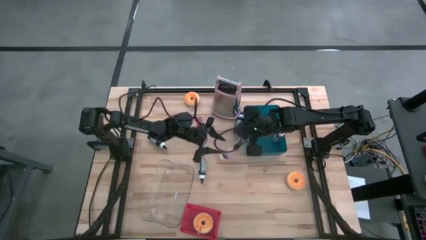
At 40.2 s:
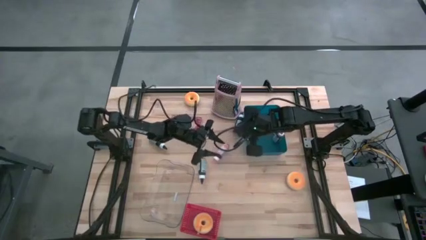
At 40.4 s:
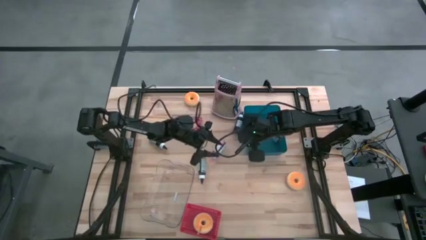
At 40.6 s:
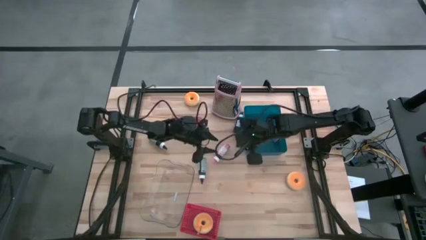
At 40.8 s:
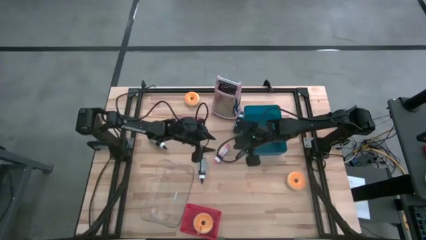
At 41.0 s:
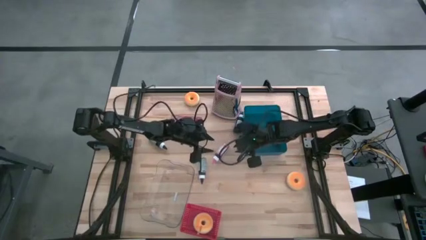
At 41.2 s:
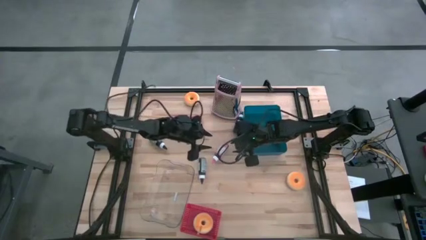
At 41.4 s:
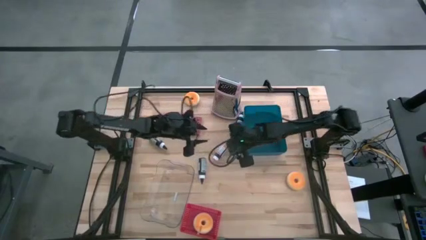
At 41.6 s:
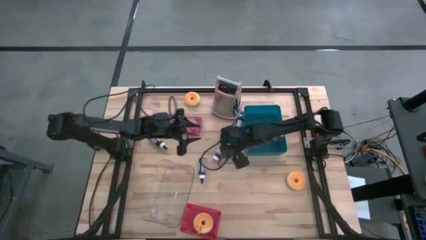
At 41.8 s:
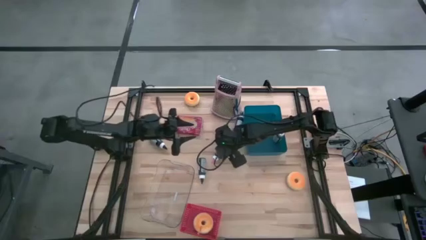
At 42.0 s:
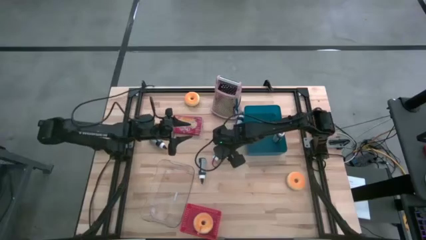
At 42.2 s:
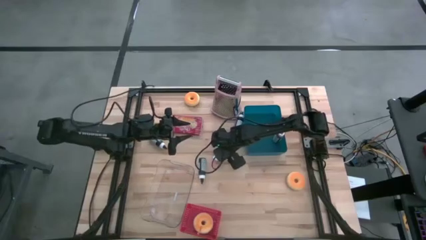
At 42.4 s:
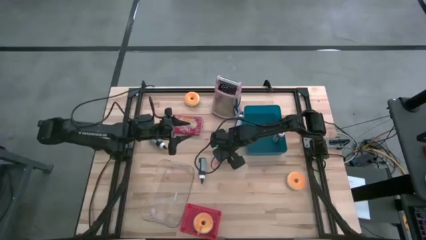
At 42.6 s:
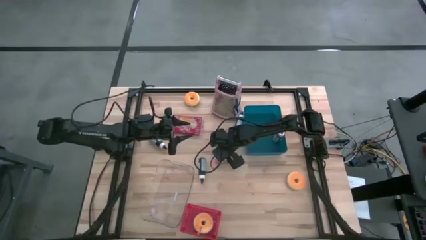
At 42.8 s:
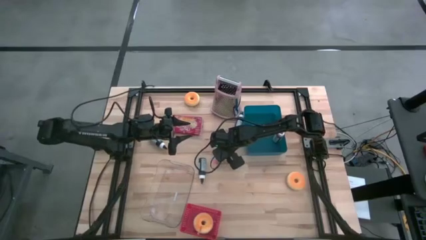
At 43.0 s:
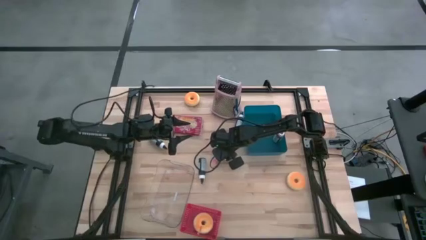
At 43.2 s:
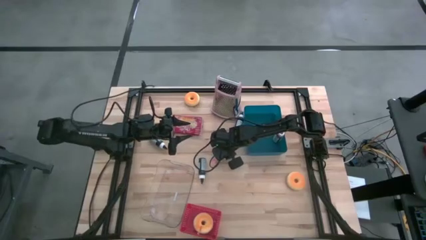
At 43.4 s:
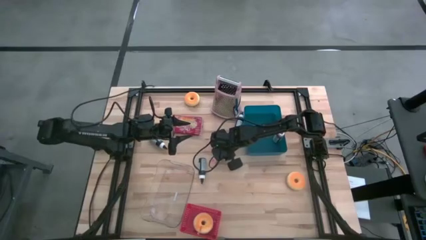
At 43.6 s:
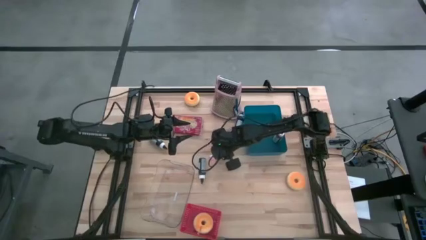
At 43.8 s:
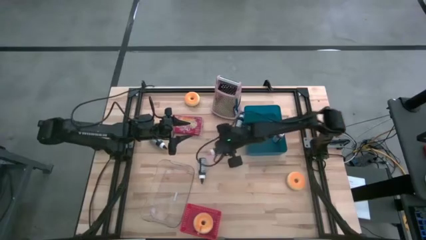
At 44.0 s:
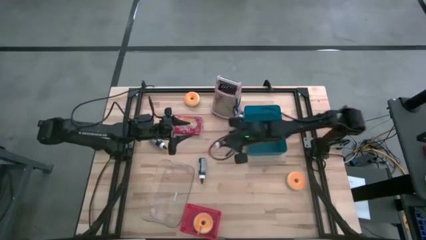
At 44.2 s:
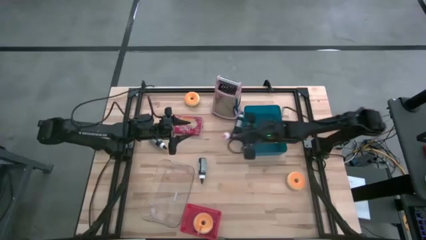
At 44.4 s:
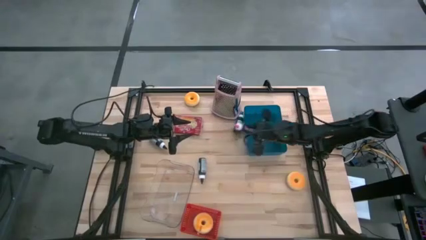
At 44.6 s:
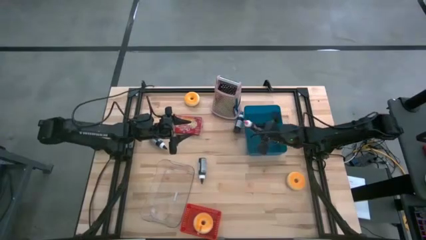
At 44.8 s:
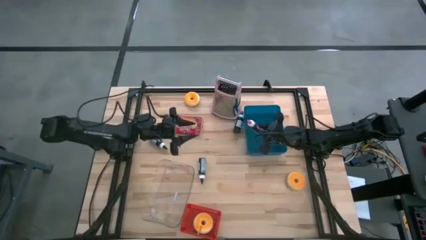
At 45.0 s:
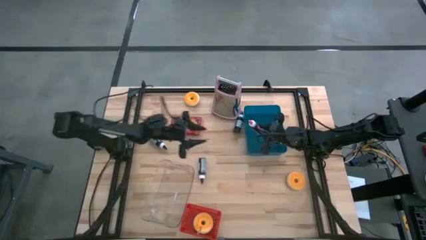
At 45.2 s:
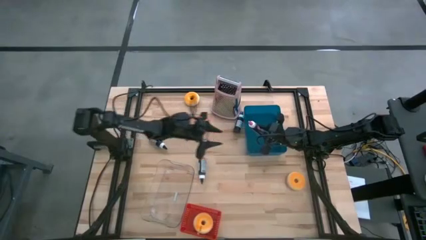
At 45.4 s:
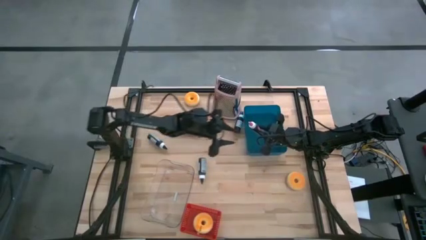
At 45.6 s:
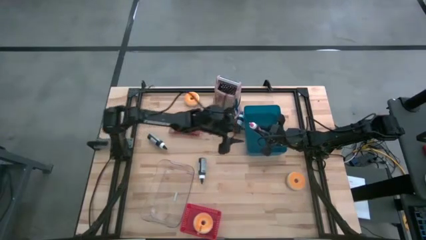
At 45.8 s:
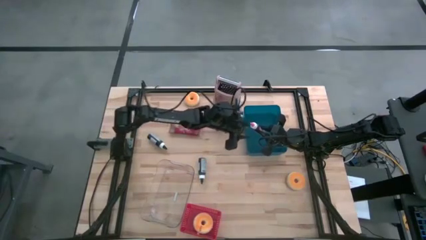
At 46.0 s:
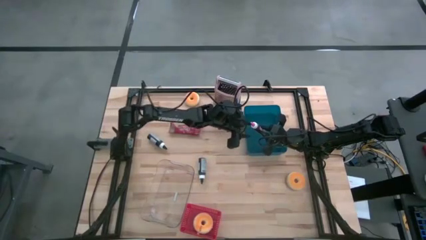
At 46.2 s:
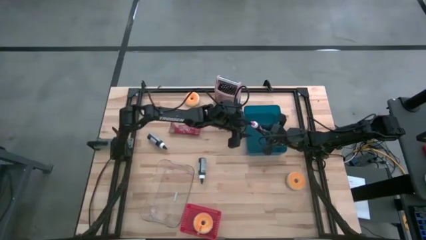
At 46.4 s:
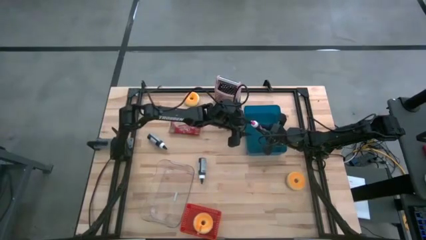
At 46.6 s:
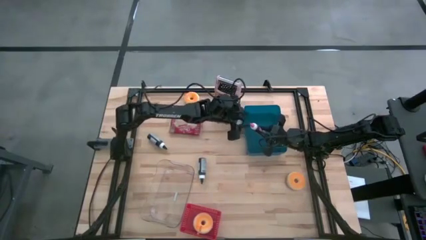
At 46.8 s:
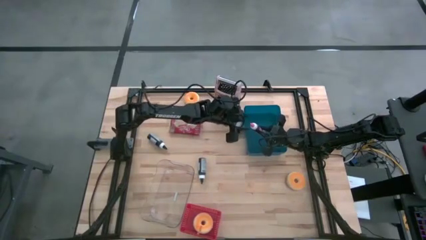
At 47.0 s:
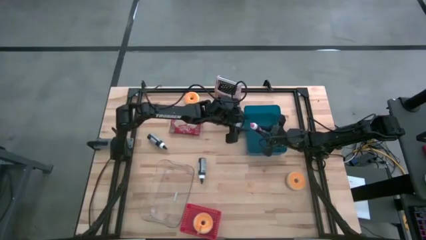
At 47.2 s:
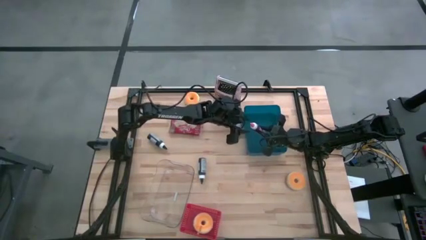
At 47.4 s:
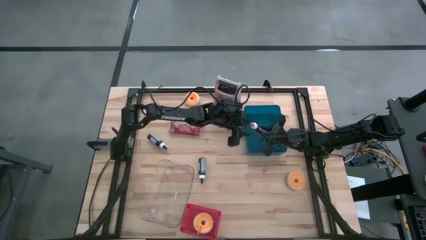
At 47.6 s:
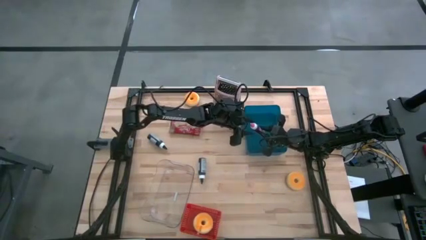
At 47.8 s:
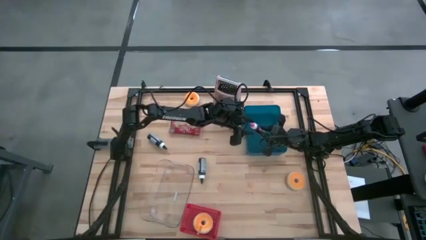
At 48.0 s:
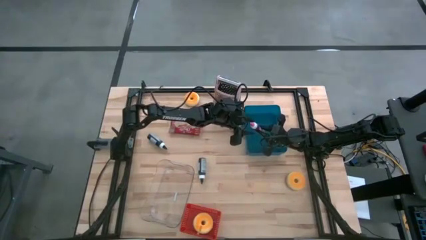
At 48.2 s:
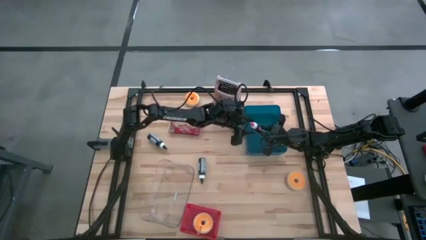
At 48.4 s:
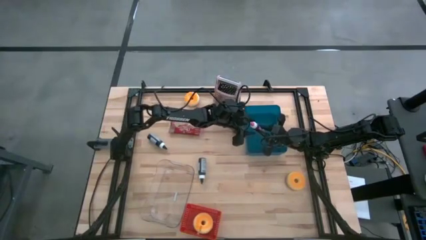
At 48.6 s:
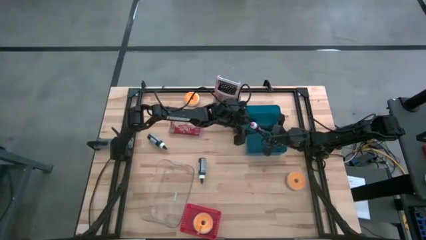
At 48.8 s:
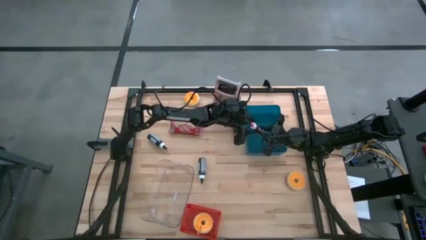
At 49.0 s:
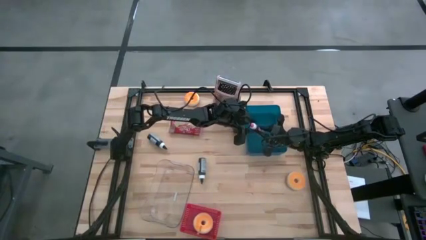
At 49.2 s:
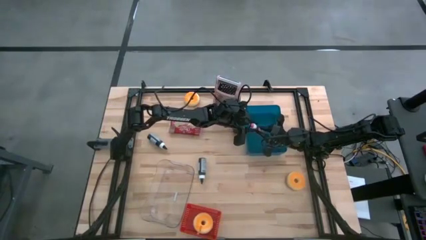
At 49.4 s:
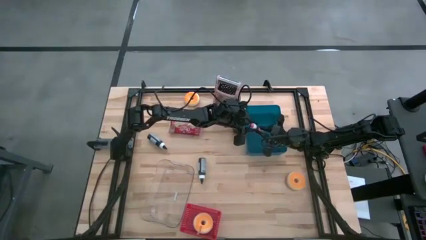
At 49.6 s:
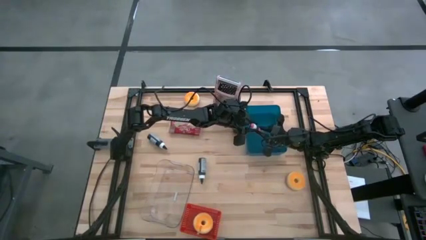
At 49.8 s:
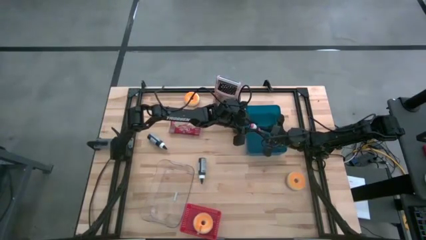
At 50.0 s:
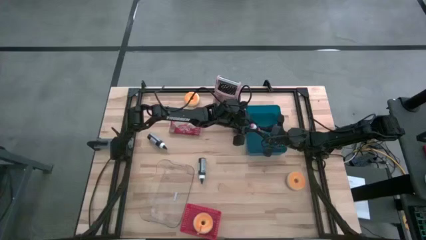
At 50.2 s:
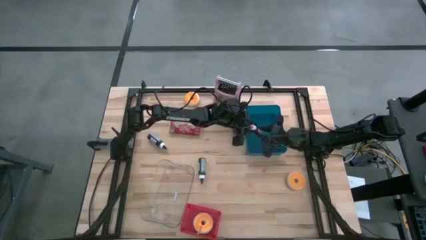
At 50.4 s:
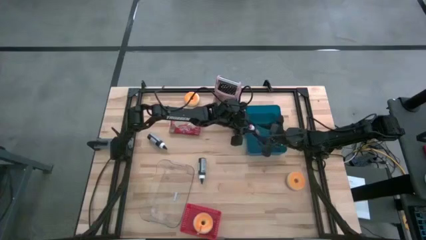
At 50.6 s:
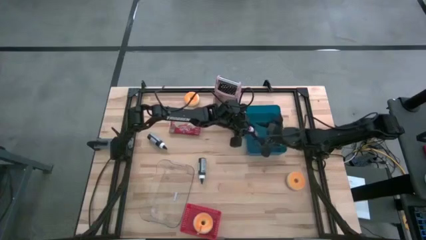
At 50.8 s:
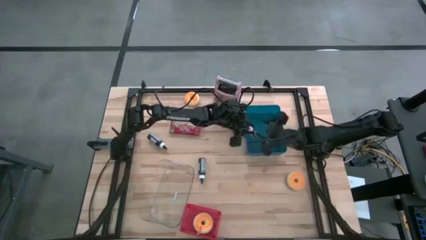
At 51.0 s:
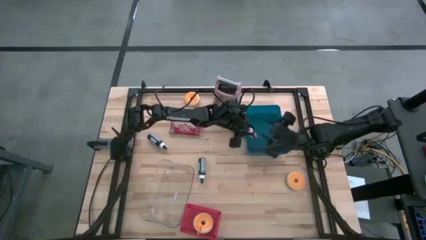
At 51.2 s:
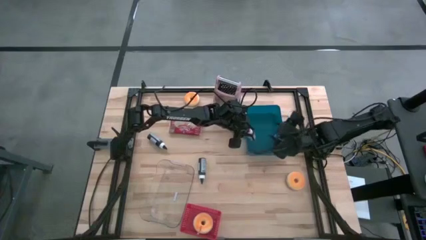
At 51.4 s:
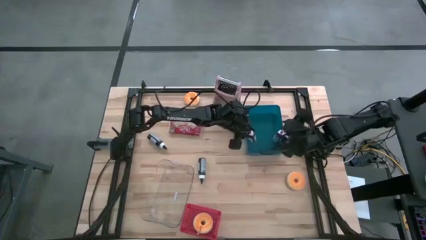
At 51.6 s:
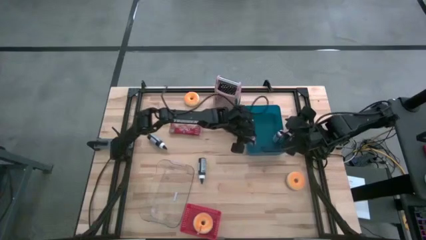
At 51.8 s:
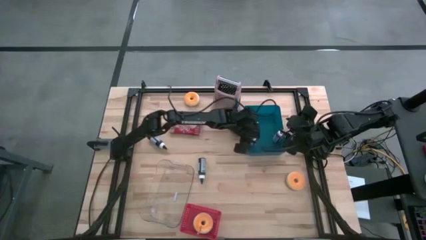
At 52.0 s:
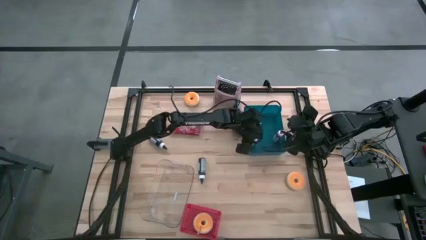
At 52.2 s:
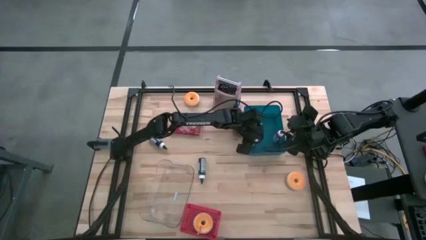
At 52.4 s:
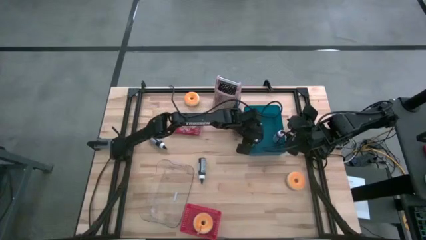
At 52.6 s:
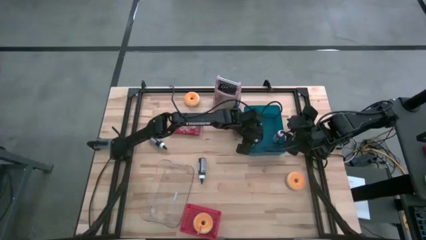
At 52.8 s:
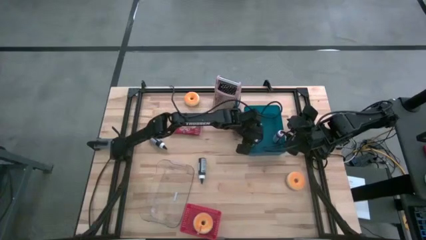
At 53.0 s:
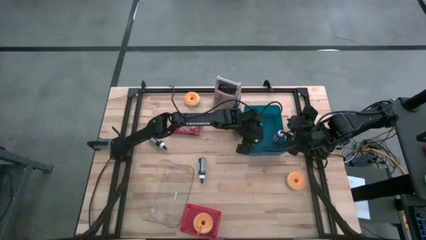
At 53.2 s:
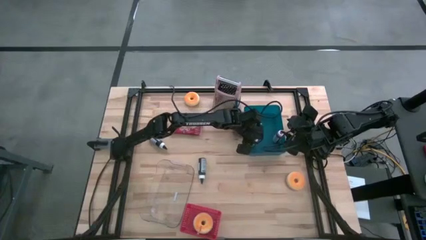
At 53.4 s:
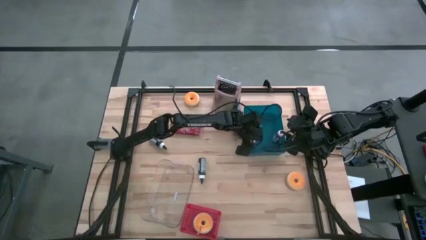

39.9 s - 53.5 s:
Task: Pick & Place Food Item
Put the pink food coloring bottle into the blue bin
